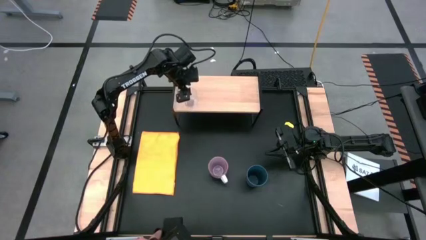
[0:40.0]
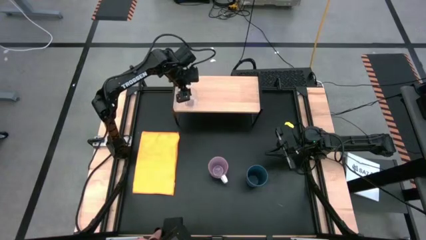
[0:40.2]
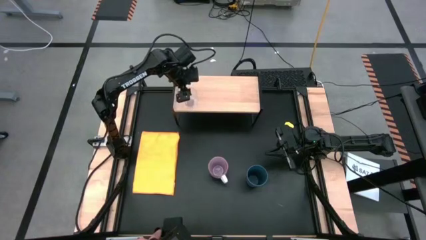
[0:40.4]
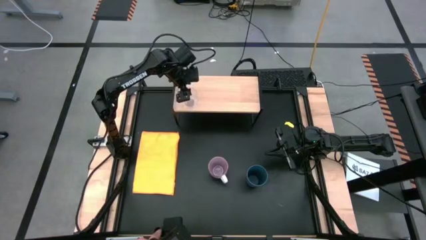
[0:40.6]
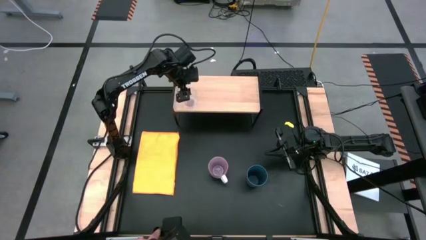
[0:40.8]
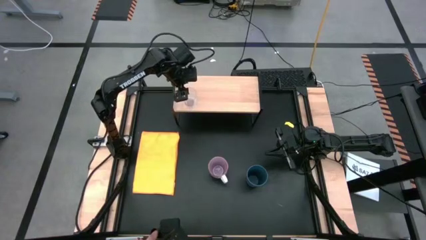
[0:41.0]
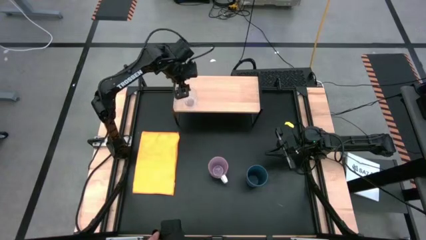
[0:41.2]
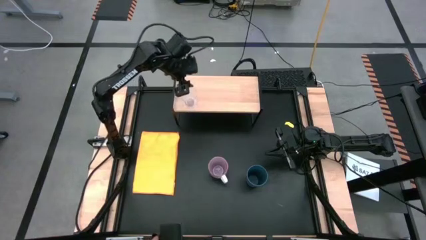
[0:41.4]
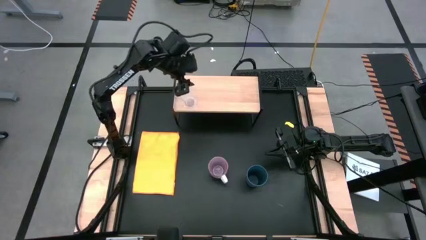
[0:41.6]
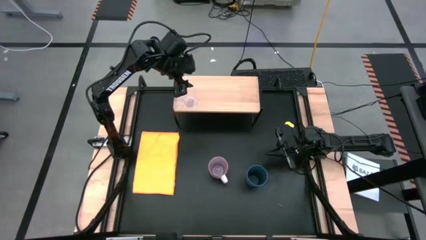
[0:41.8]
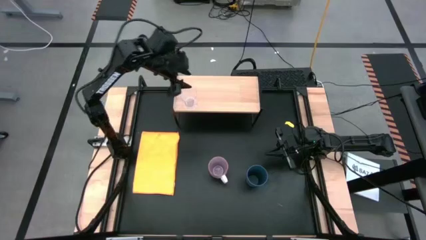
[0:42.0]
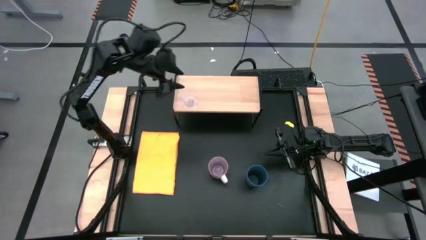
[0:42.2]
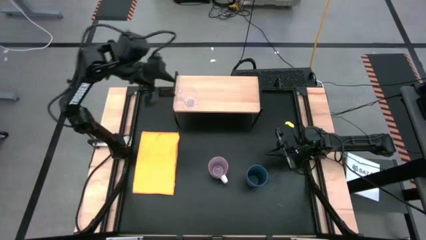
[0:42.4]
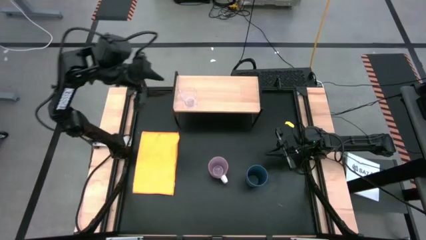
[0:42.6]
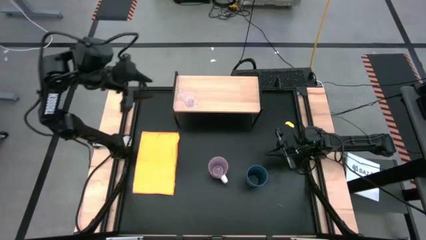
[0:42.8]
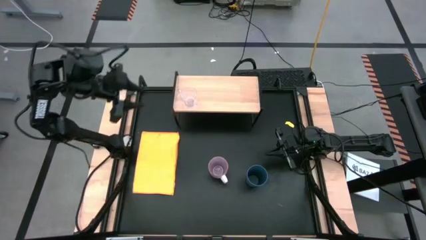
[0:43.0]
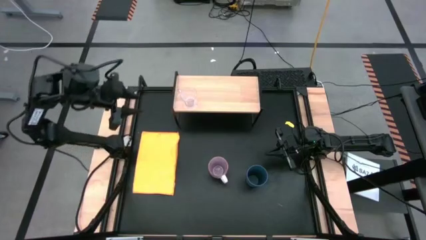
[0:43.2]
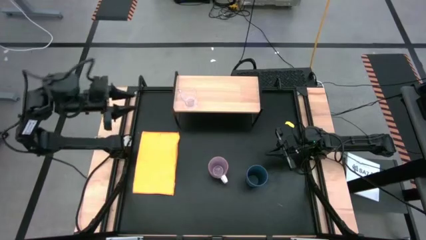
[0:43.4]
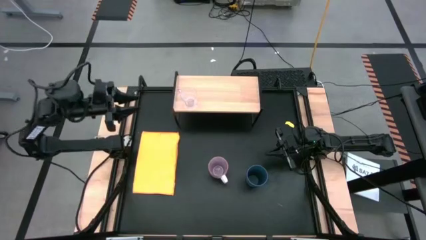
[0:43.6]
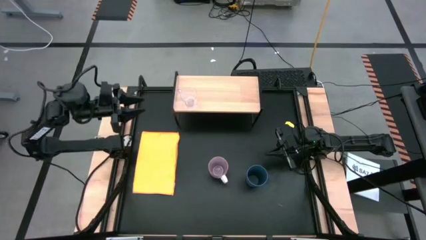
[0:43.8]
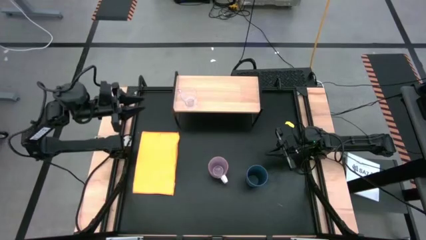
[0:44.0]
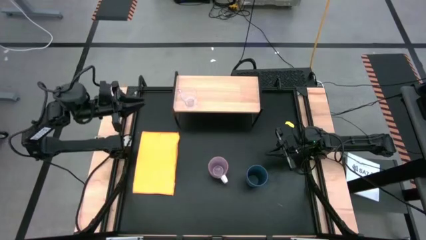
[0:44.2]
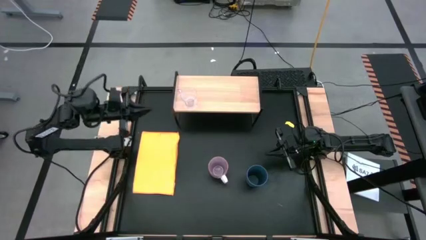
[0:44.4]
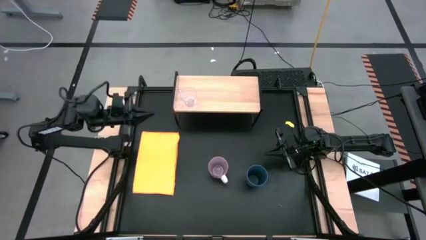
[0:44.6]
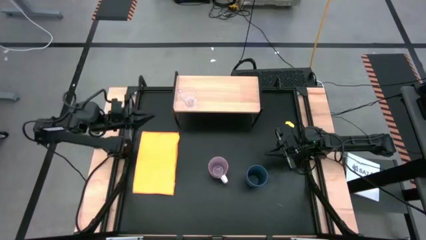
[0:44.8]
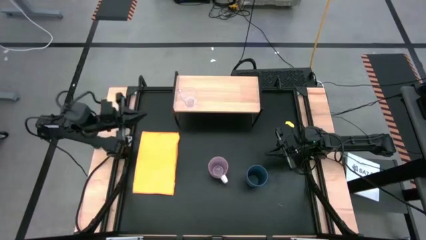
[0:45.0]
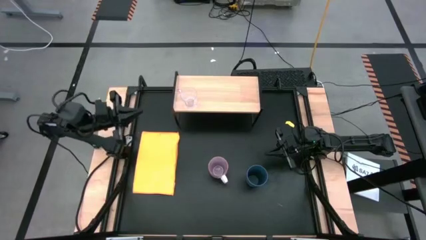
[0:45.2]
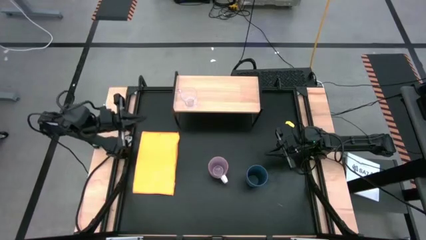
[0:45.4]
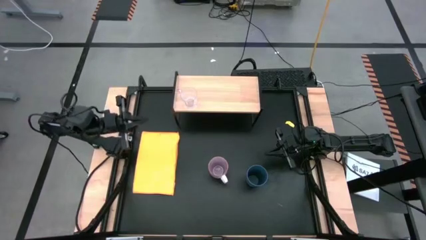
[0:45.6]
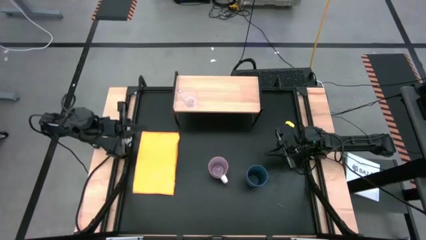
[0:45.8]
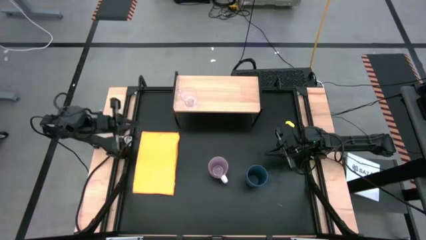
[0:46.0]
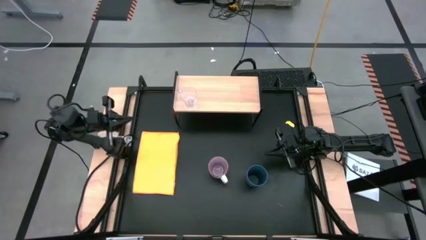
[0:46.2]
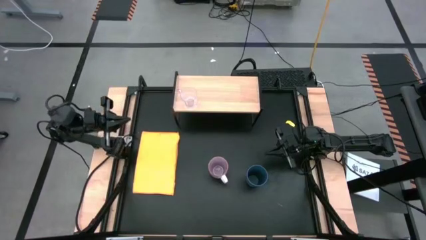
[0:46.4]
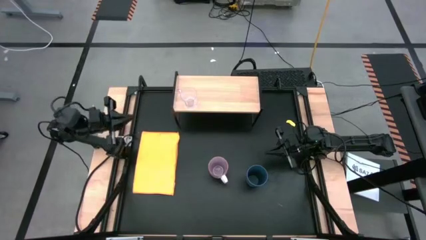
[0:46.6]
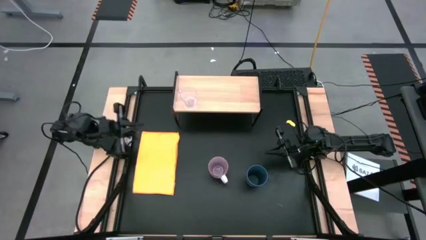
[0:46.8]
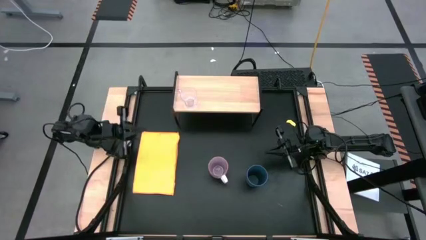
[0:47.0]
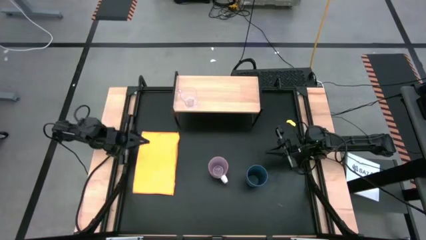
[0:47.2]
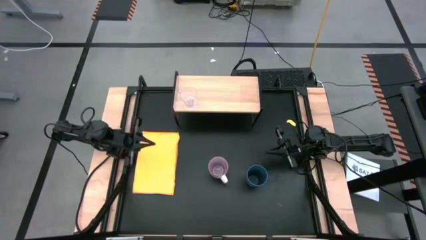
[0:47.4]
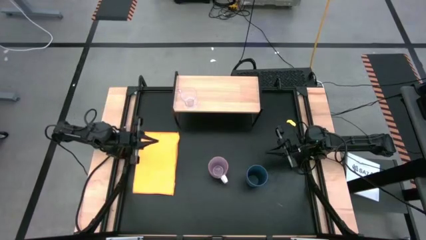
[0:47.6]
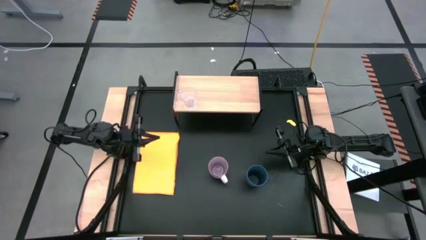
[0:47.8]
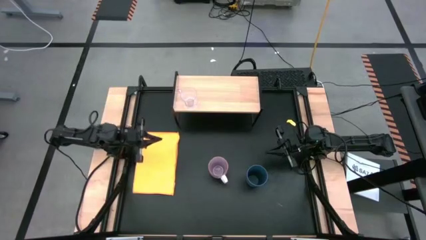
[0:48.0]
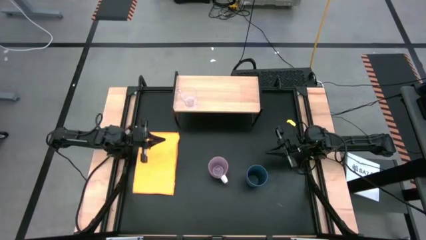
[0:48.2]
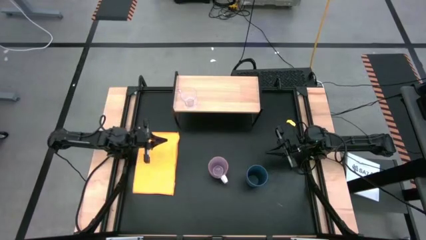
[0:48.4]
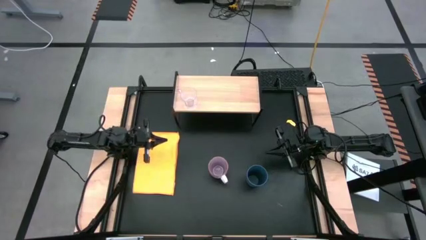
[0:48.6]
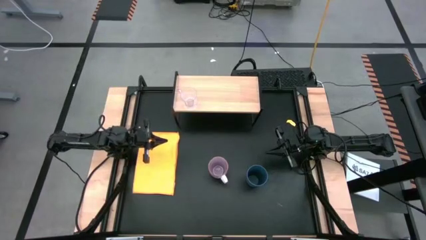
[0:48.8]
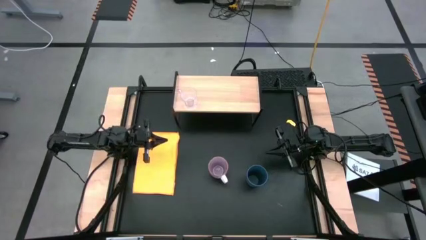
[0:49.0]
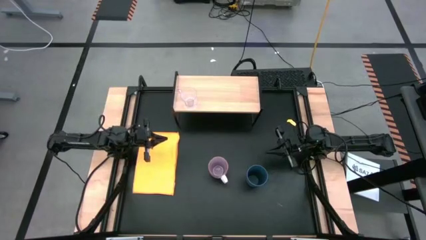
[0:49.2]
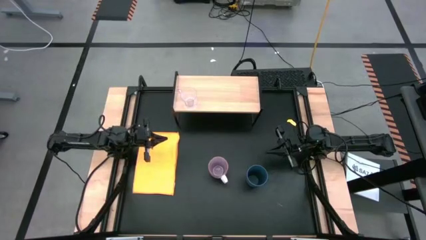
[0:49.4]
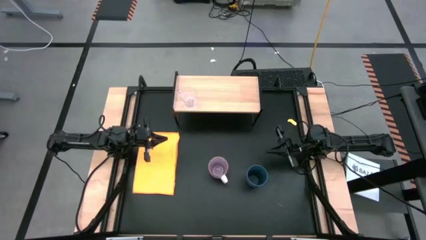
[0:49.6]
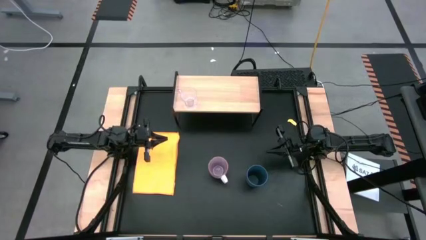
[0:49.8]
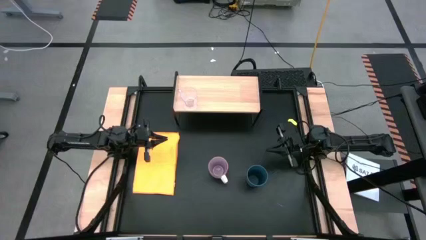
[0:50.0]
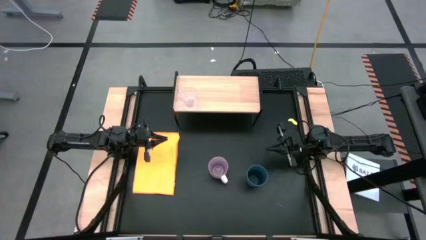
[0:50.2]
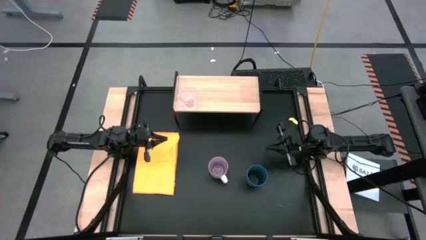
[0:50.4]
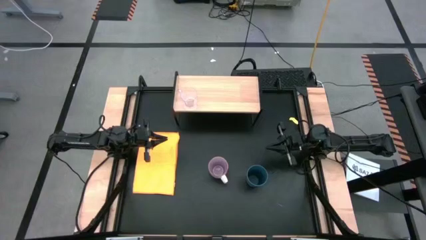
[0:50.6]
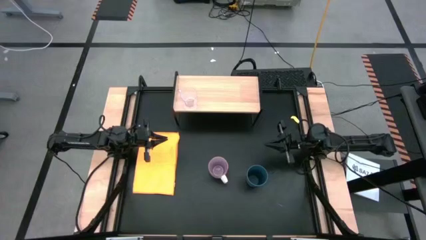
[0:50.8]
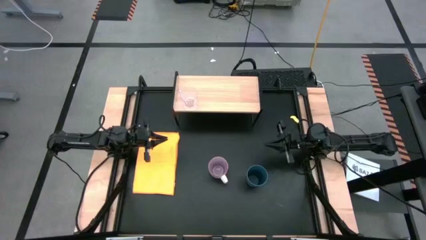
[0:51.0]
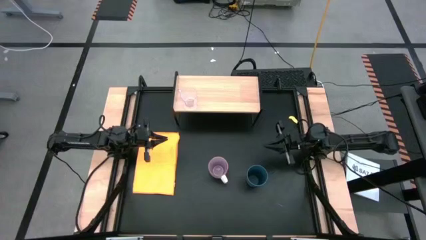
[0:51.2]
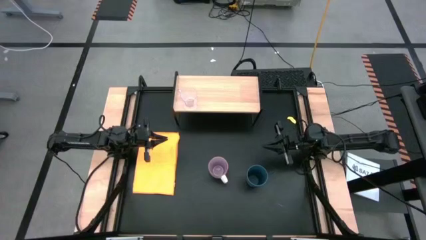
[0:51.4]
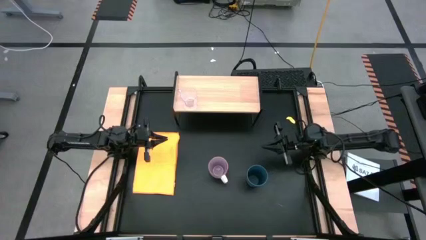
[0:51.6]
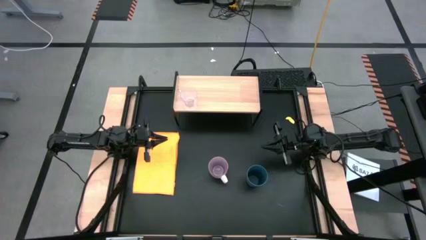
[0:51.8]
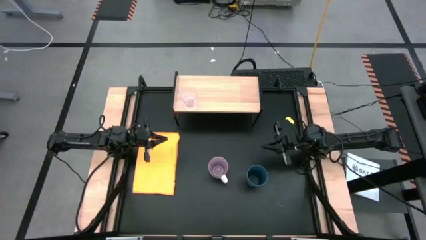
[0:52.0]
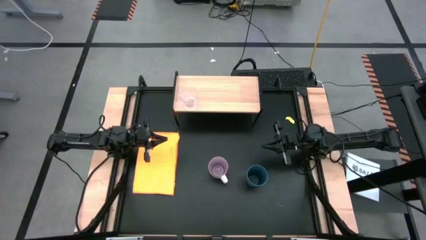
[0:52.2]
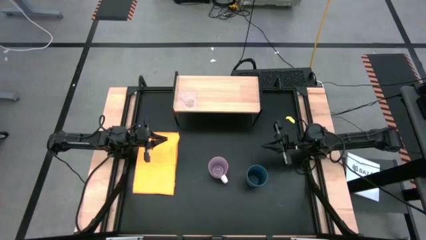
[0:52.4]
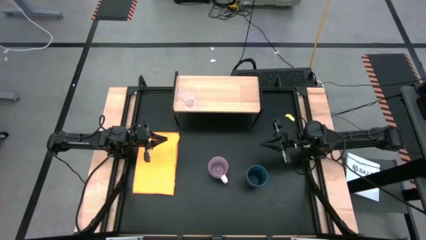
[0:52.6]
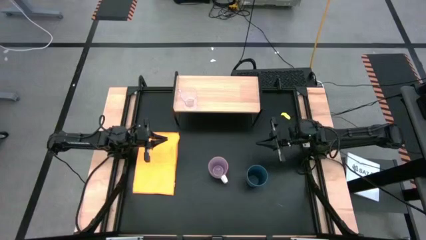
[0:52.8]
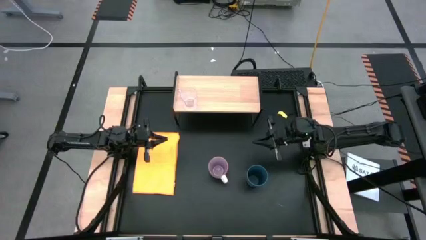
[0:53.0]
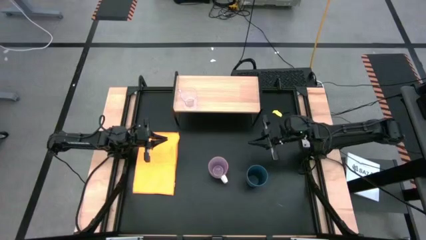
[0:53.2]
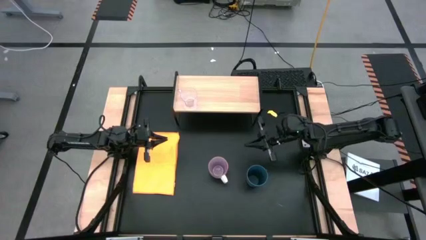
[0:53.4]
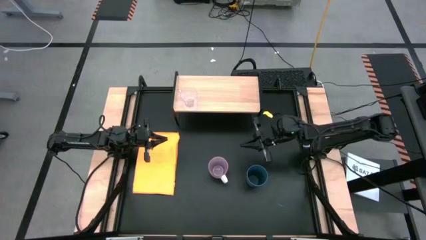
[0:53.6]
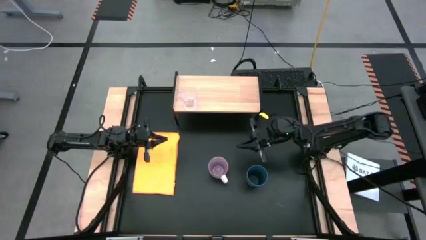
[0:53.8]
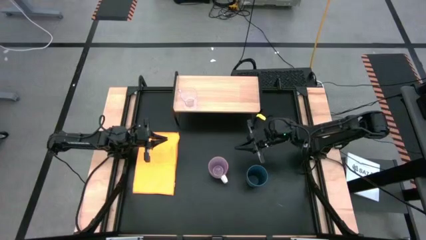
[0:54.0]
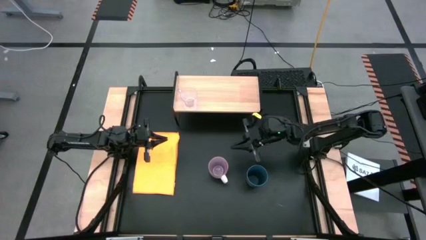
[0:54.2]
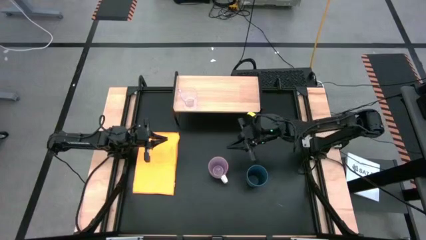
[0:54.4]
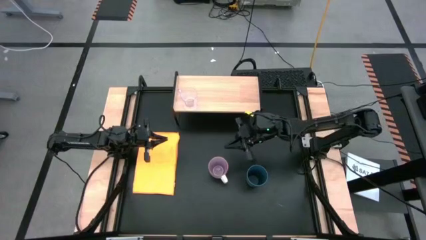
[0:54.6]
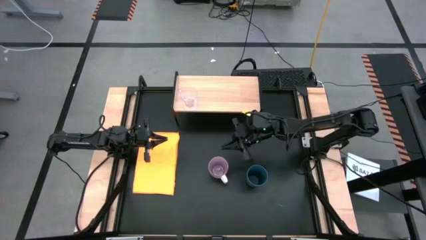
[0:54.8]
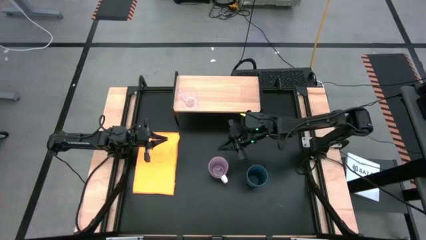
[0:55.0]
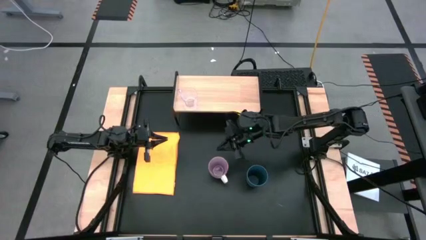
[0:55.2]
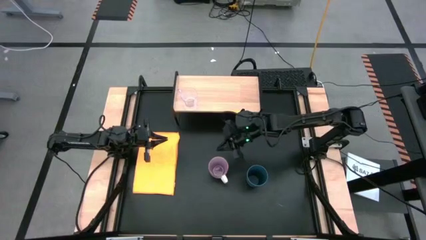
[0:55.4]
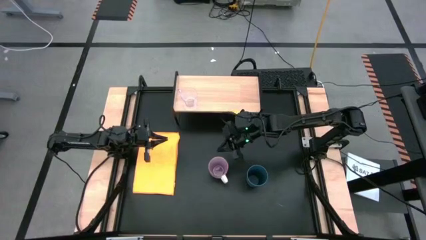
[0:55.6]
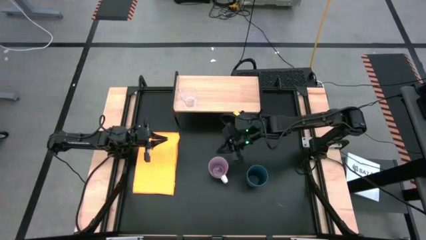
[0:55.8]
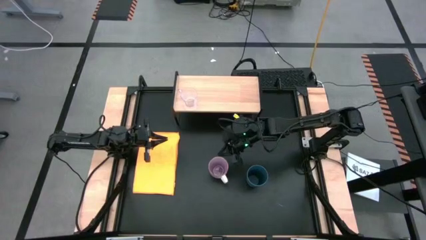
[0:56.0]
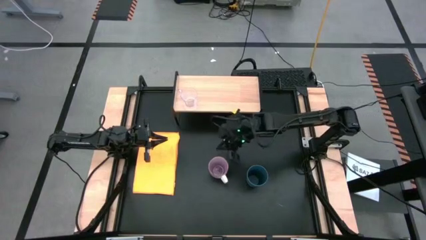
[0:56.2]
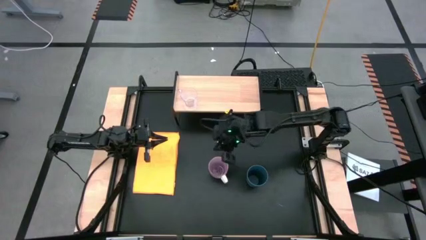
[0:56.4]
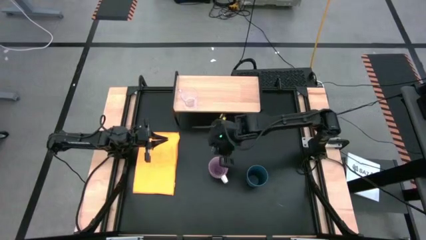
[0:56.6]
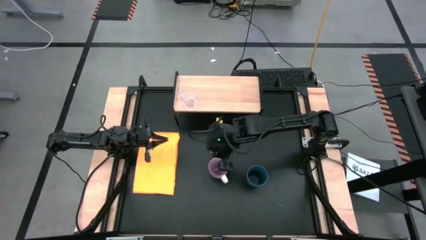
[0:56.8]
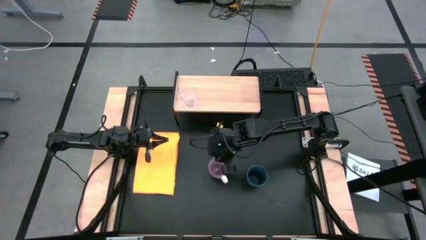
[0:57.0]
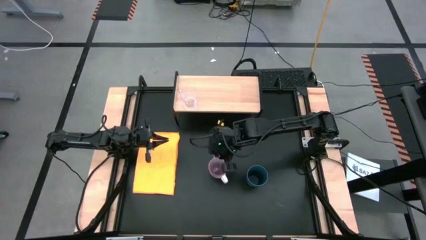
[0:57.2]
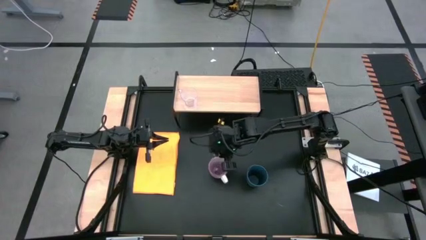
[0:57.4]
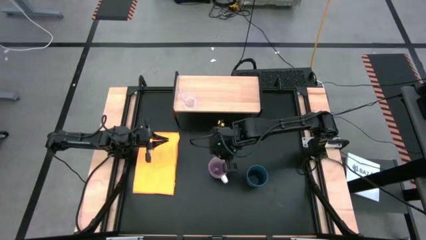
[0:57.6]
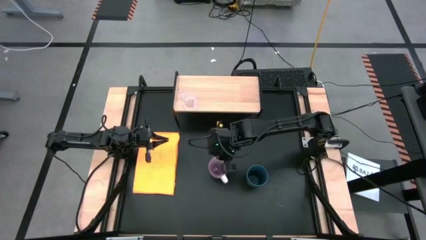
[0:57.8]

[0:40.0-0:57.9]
Task: Stack small to large cups/mugs on shelf
Put the purple mug on the shelf
